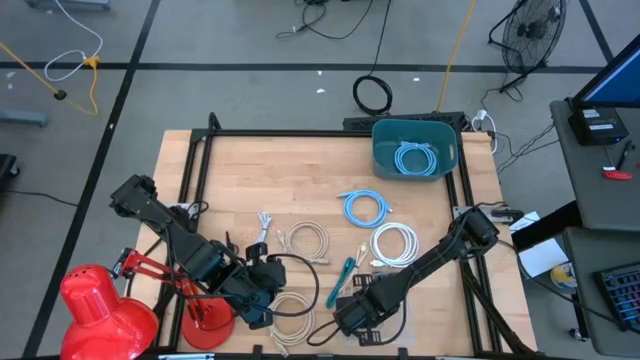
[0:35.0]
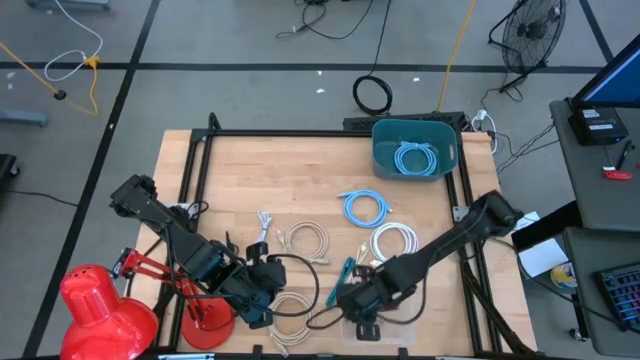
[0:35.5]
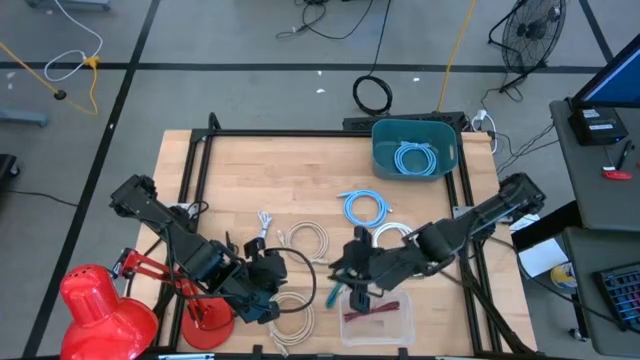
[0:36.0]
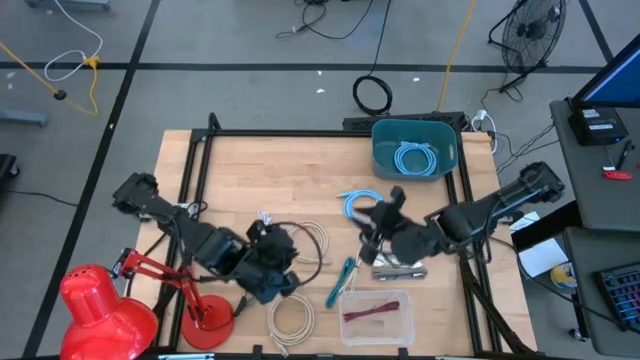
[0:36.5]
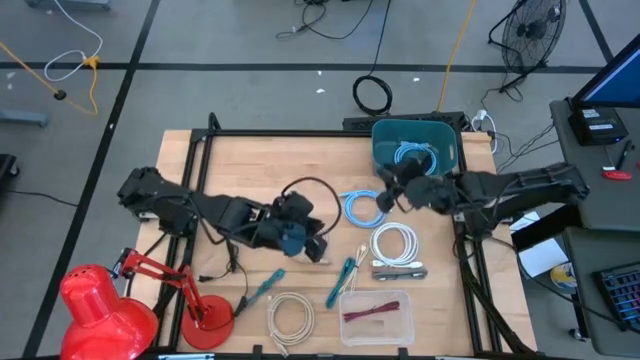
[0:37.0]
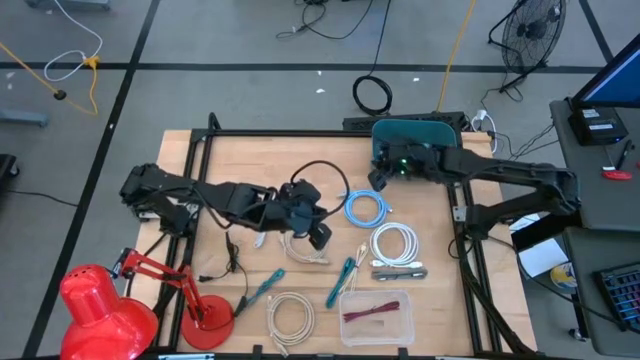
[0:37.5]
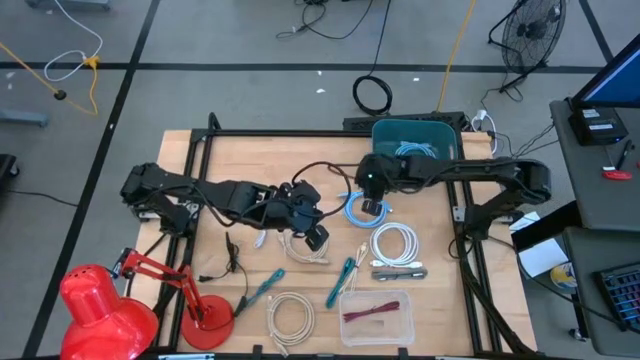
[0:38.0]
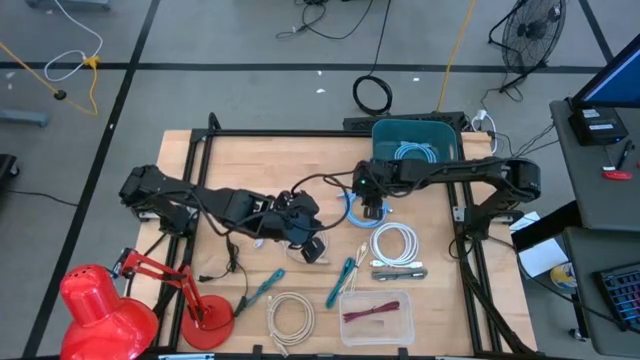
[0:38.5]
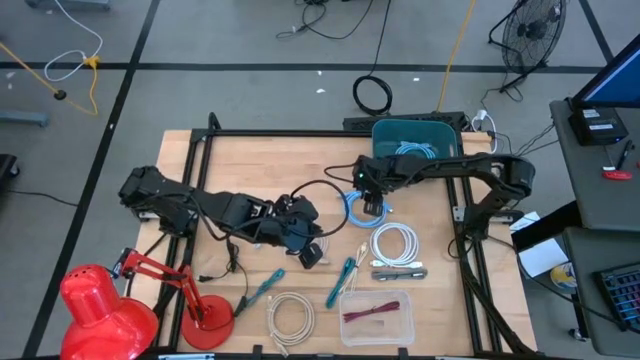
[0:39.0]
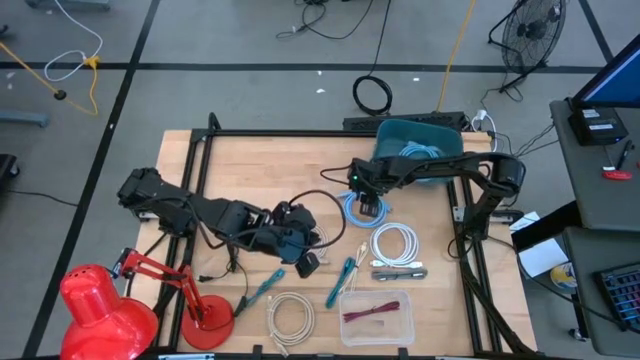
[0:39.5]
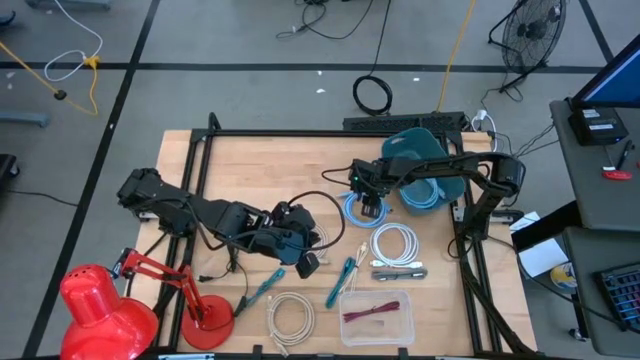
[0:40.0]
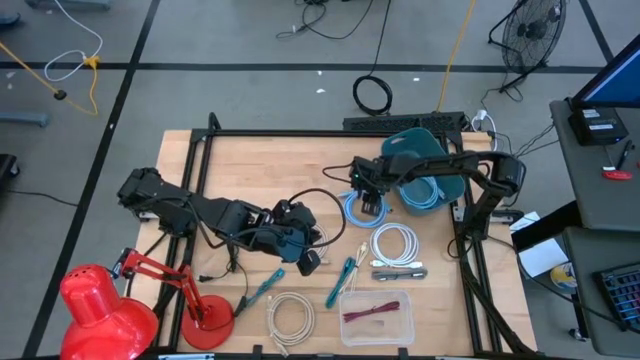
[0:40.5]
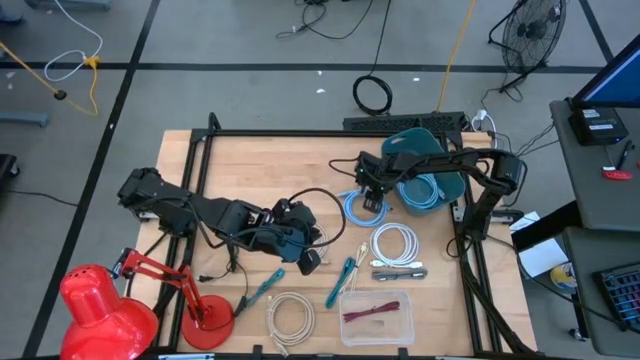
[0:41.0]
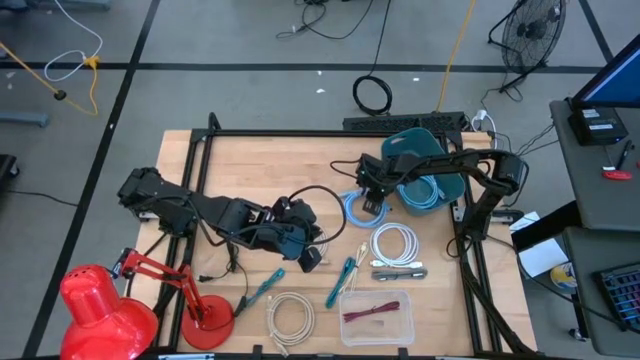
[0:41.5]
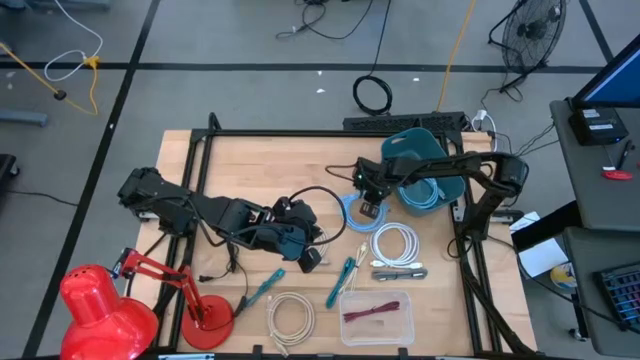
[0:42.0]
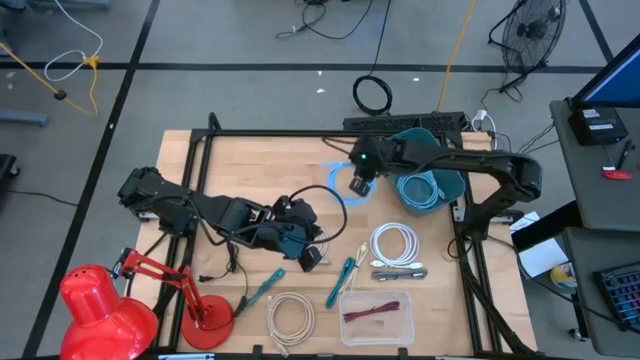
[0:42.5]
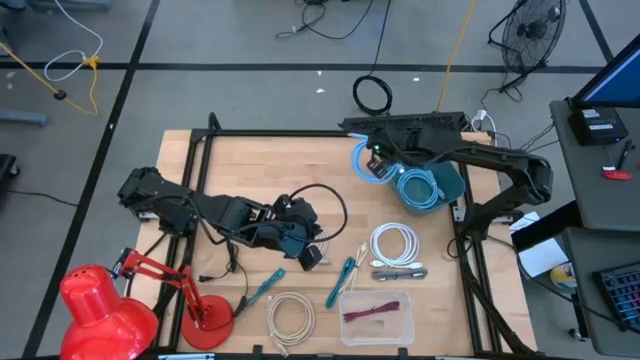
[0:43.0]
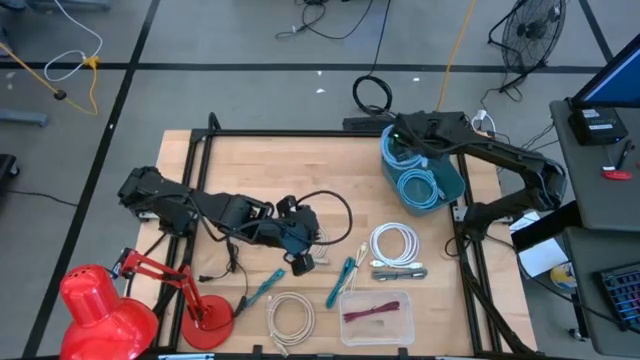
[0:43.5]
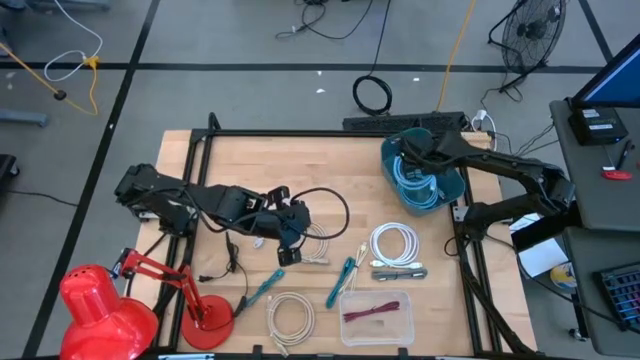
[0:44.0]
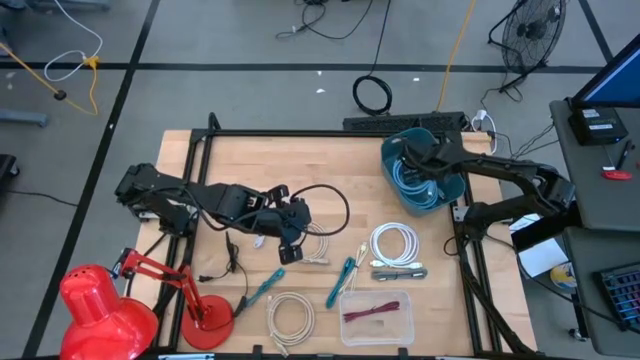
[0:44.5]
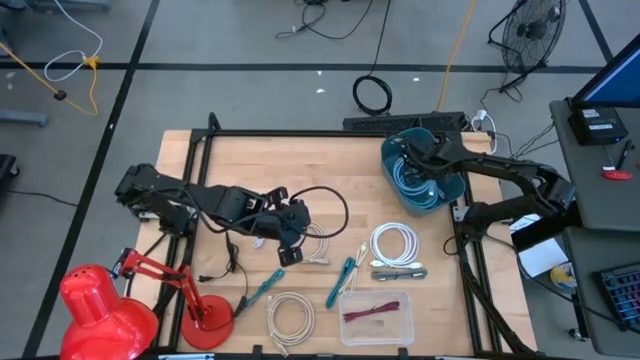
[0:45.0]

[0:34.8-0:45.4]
Task: Pick & Place USB Port
Put the blue HDMI cable into the blue bin

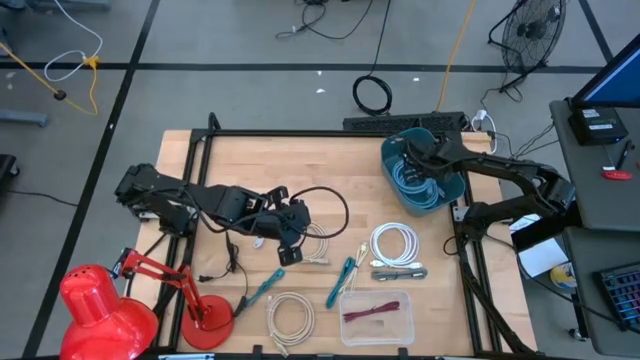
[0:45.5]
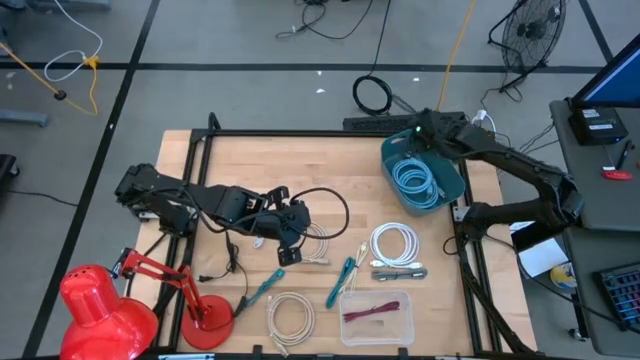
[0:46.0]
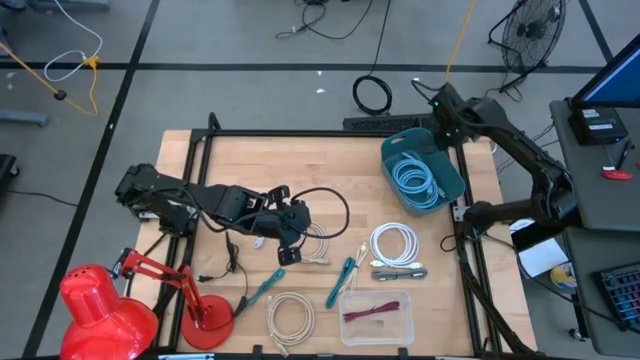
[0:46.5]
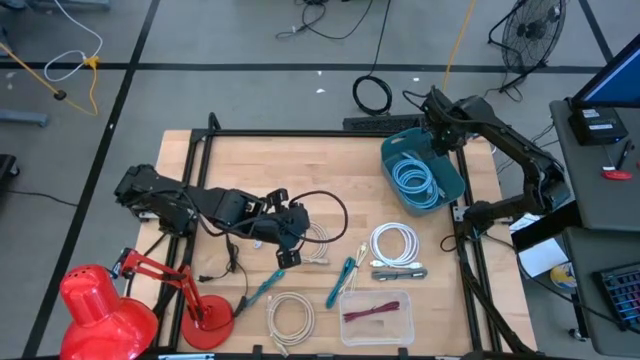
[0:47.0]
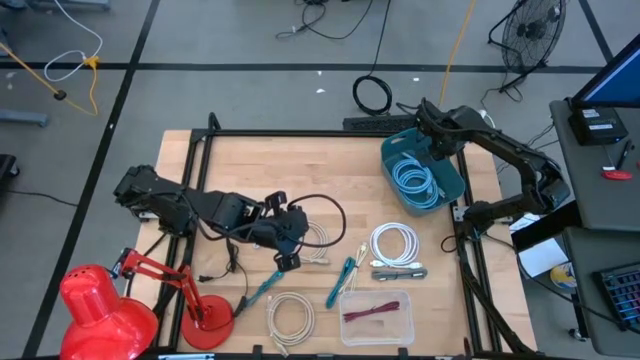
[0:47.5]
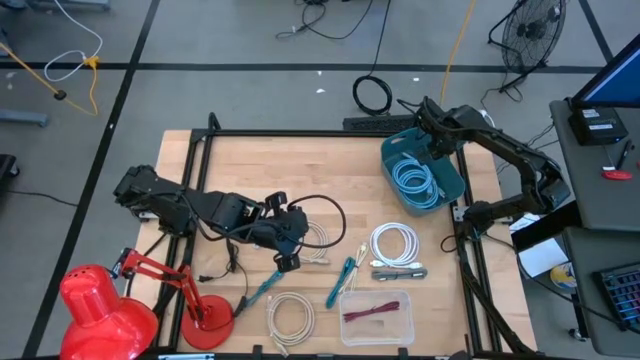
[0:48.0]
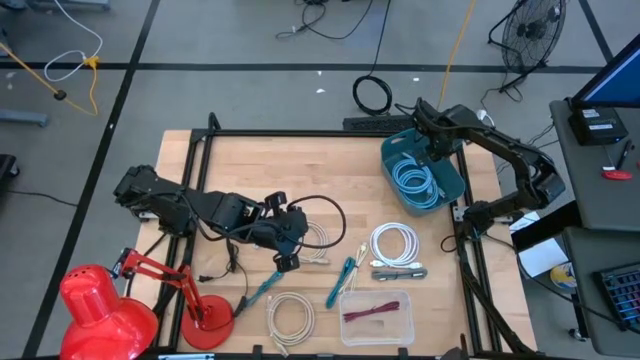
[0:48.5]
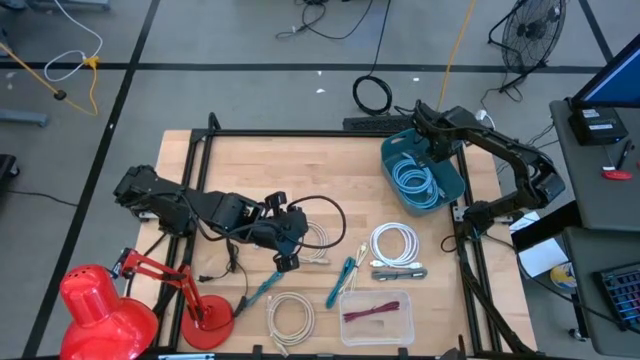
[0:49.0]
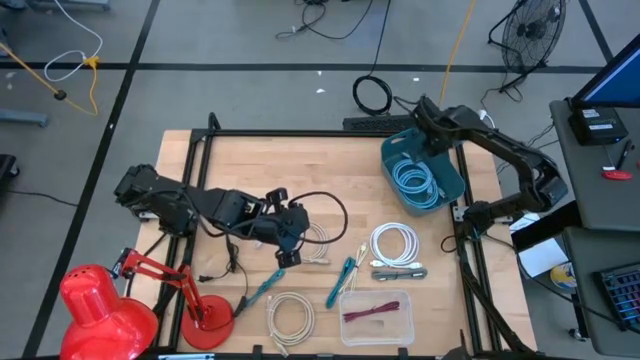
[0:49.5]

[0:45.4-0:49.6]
Adjust the blue bin

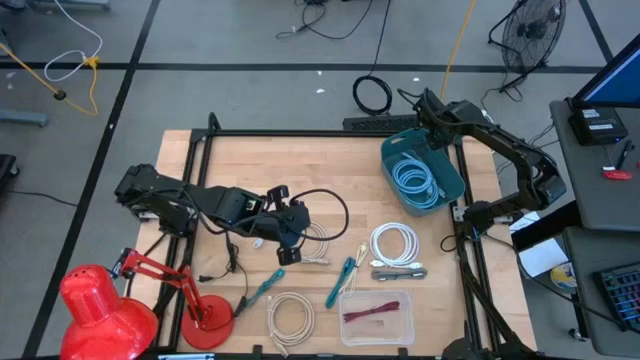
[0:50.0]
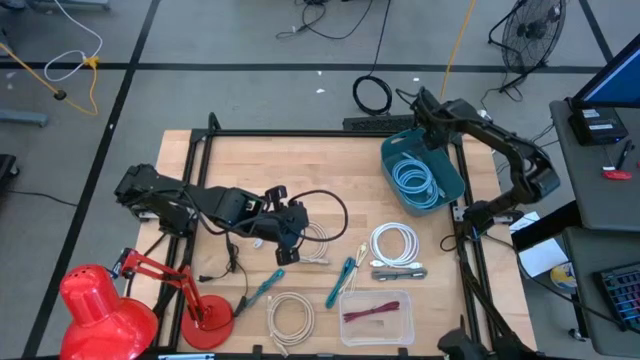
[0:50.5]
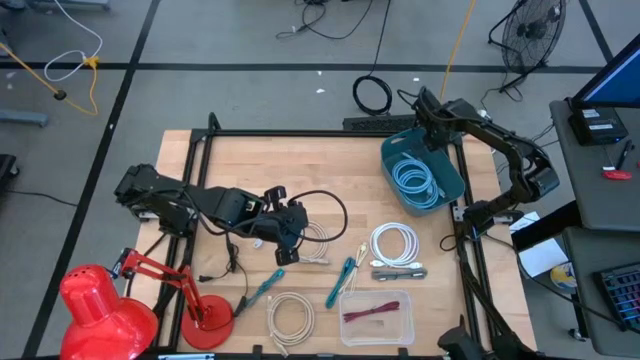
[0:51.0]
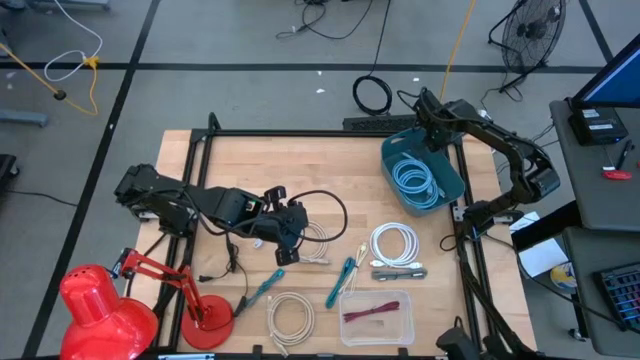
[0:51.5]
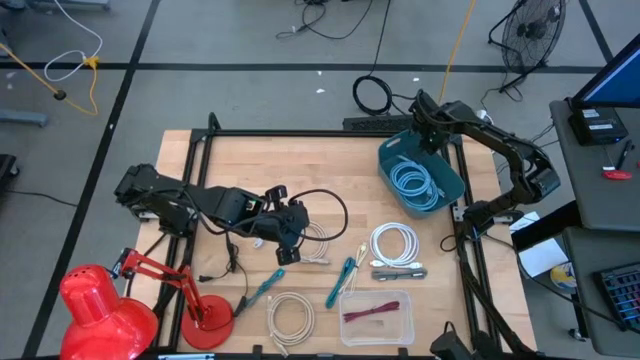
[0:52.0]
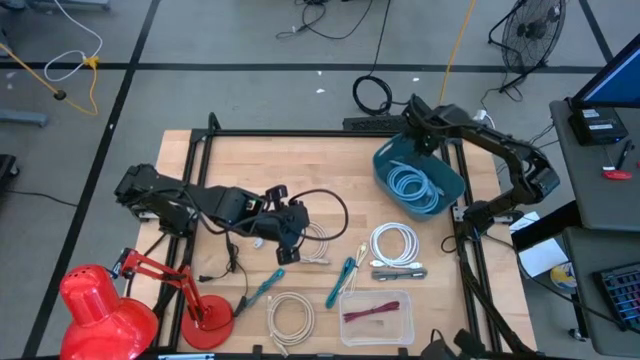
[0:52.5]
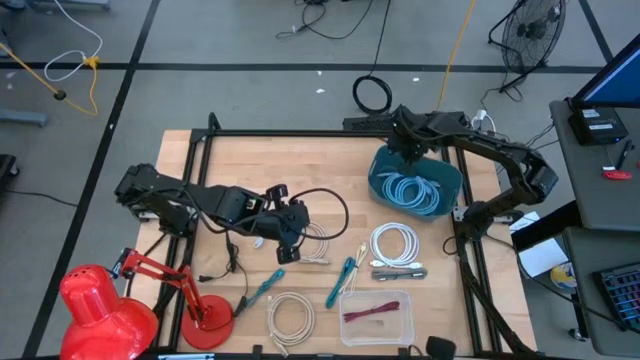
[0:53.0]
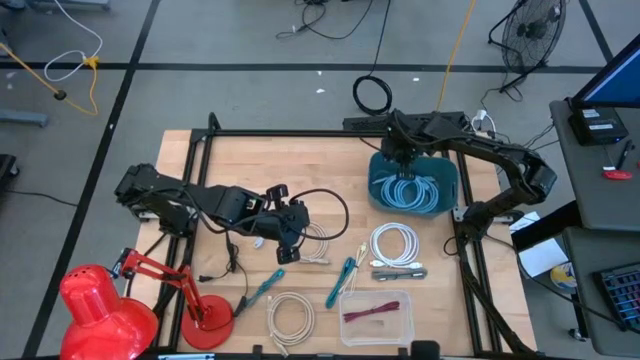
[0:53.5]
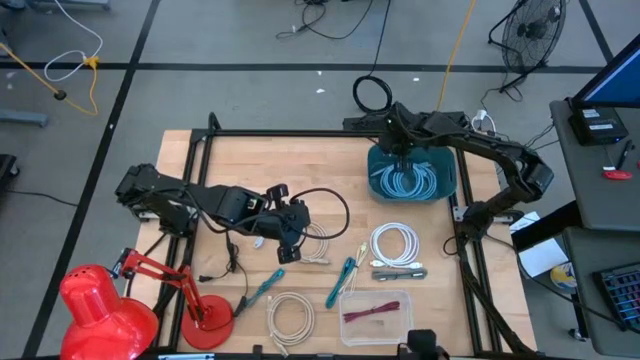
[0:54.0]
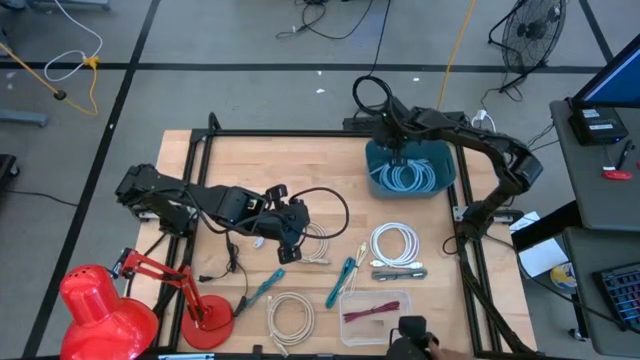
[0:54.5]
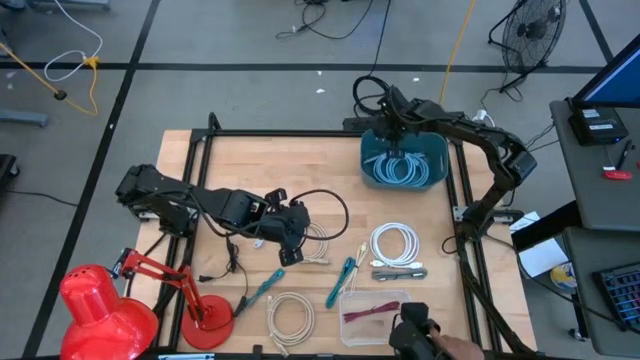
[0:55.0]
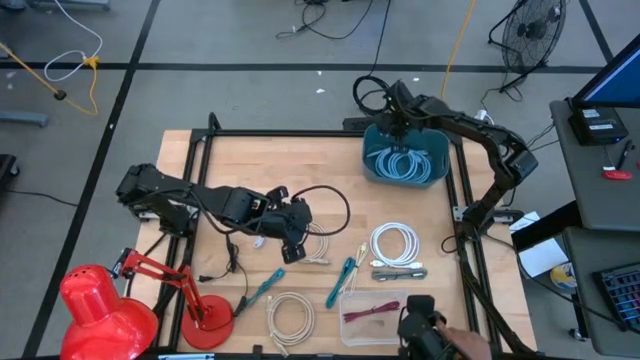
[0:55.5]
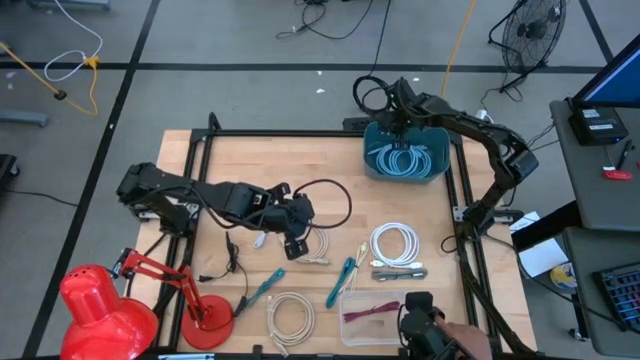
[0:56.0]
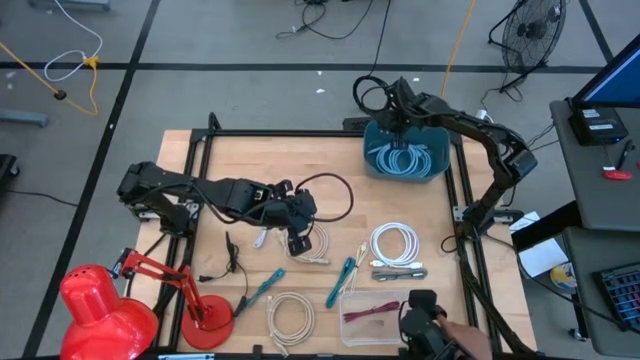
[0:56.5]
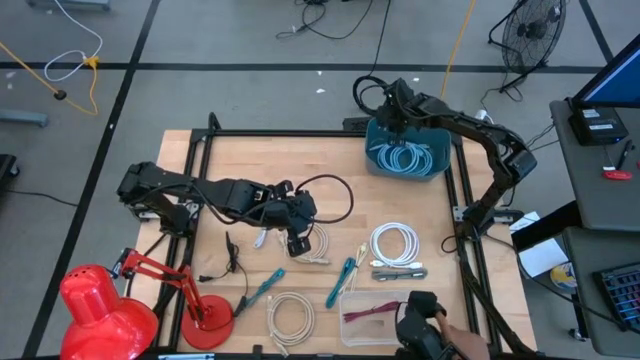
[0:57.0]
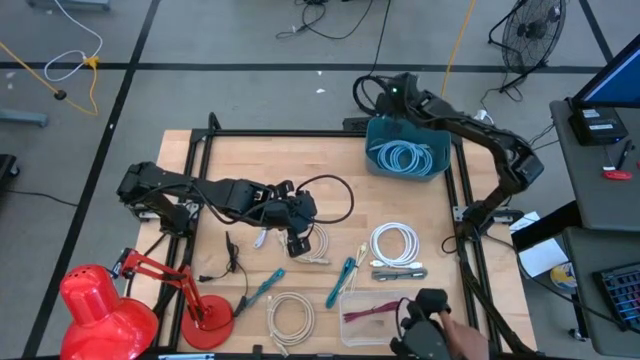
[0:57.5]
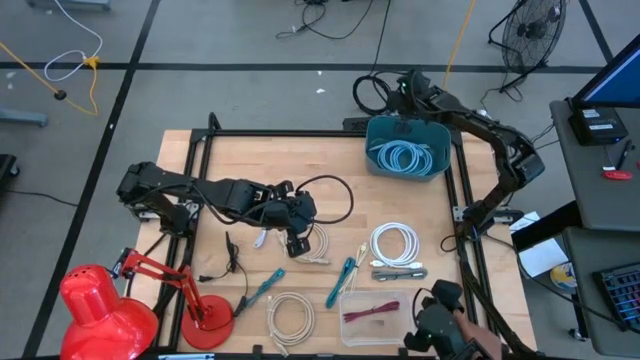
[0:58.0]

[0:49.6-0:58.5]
Adjust the blue bin
